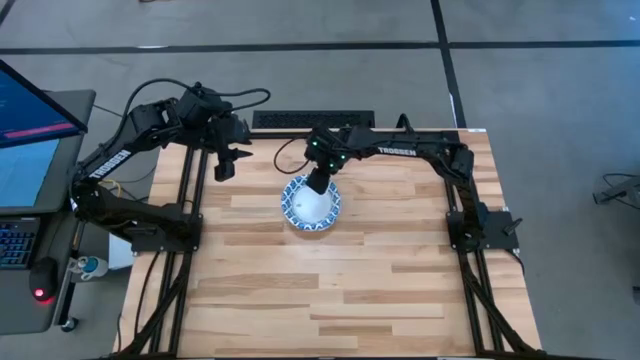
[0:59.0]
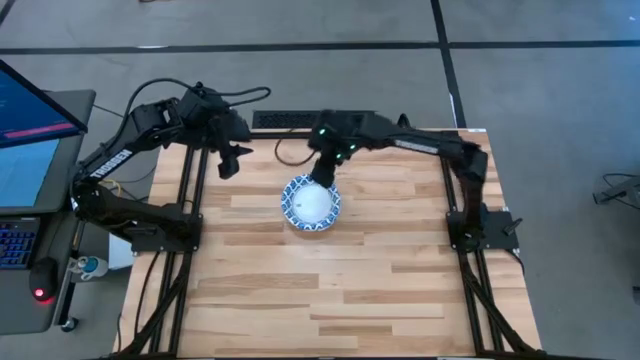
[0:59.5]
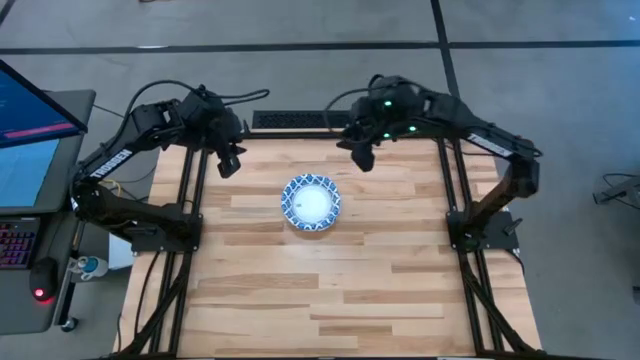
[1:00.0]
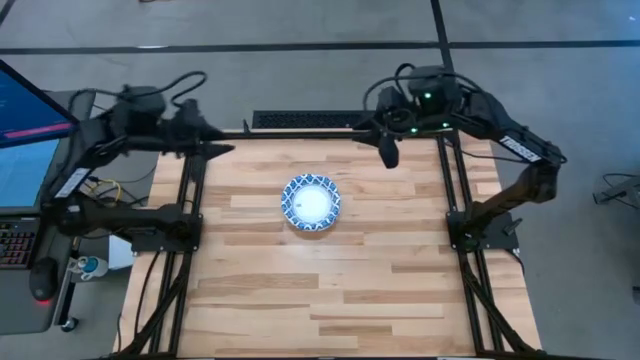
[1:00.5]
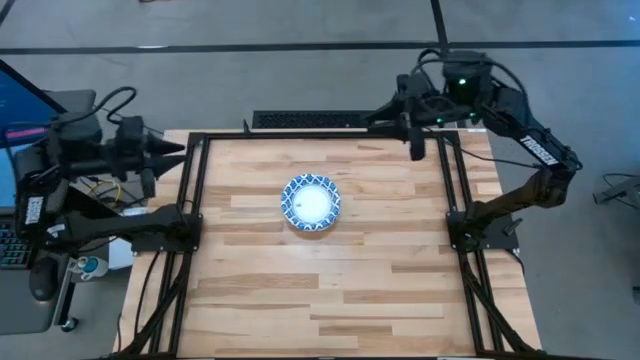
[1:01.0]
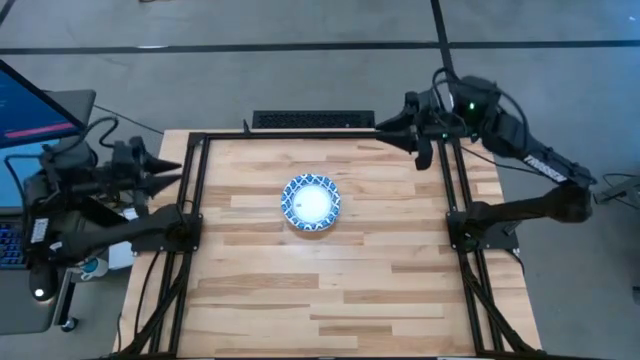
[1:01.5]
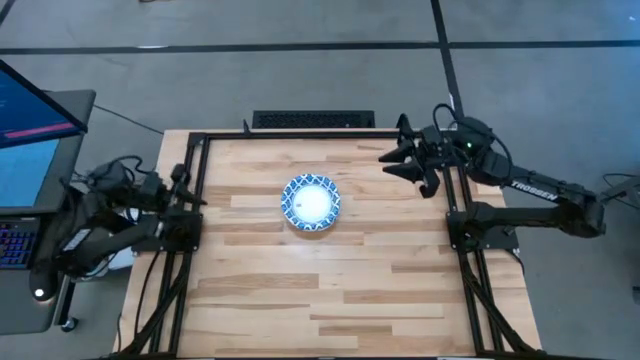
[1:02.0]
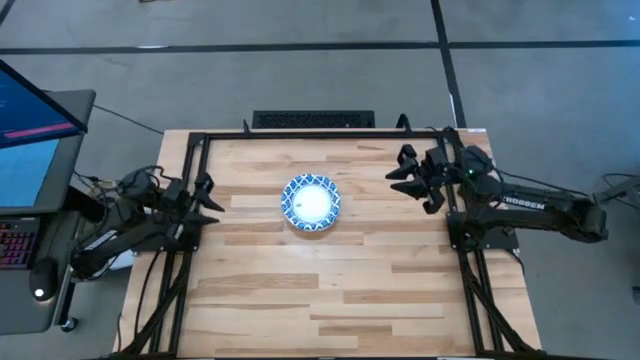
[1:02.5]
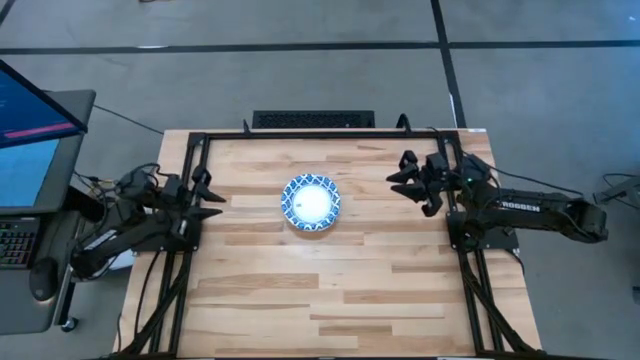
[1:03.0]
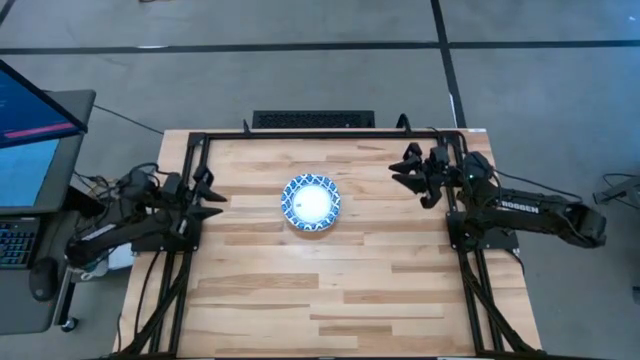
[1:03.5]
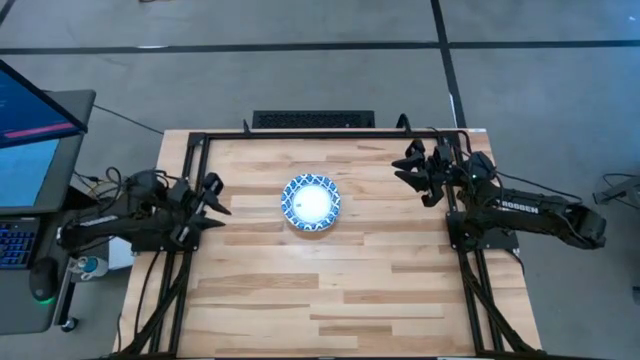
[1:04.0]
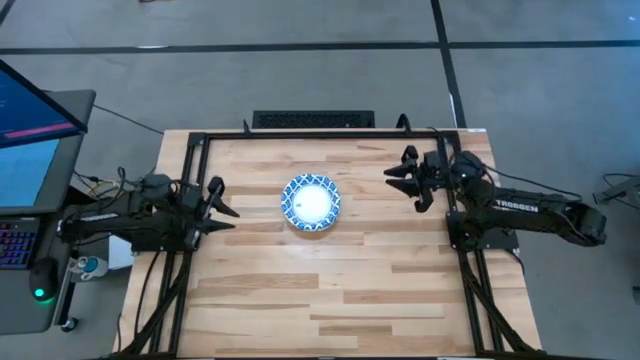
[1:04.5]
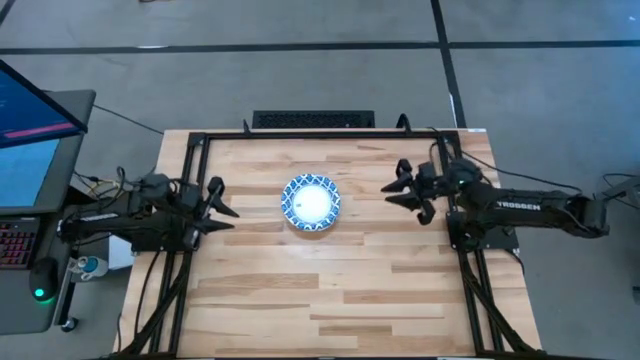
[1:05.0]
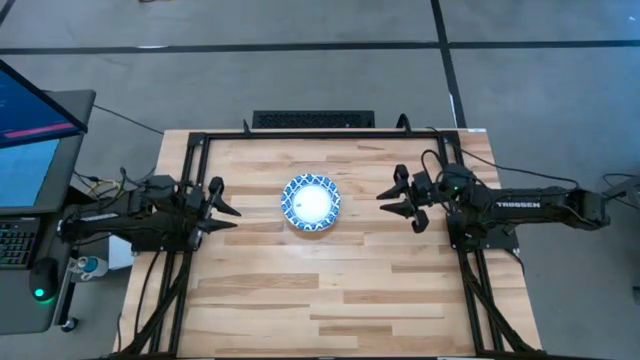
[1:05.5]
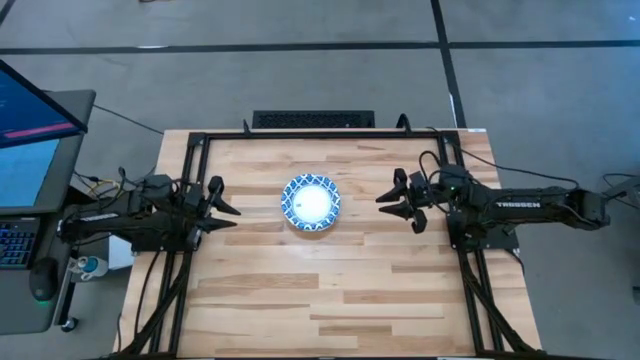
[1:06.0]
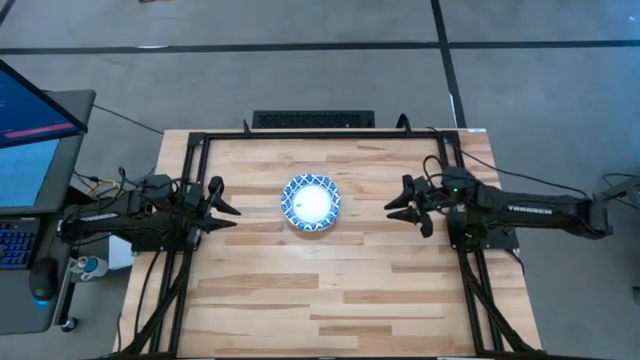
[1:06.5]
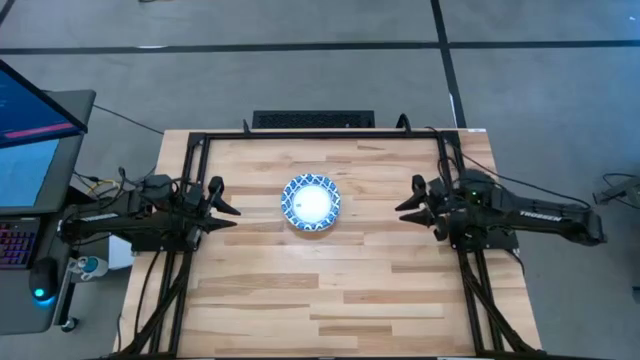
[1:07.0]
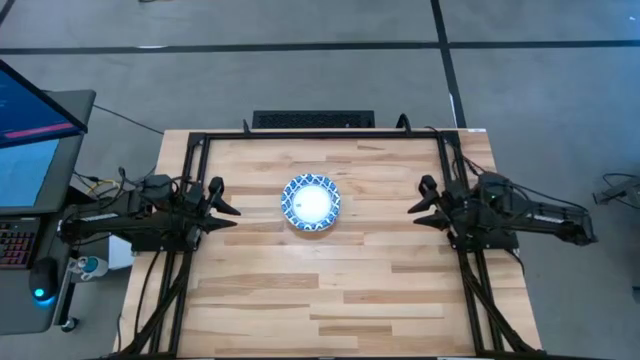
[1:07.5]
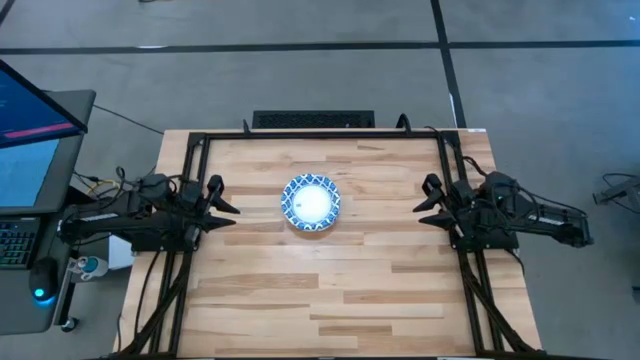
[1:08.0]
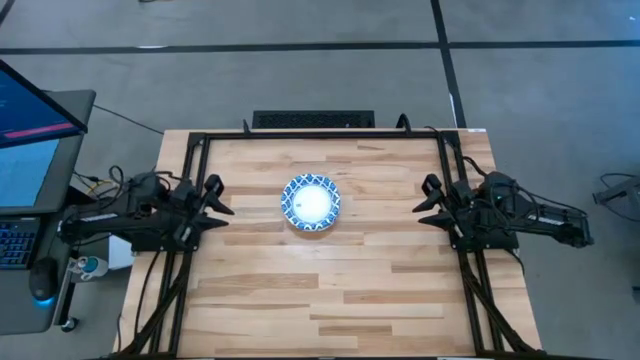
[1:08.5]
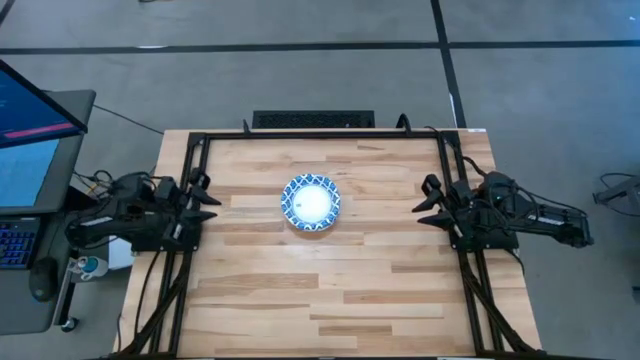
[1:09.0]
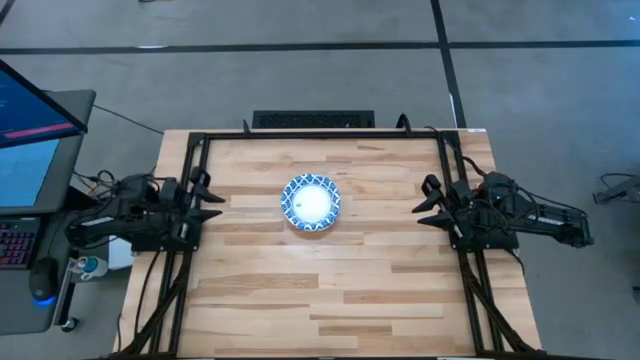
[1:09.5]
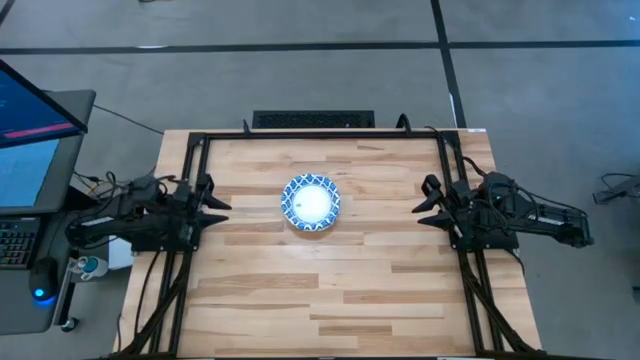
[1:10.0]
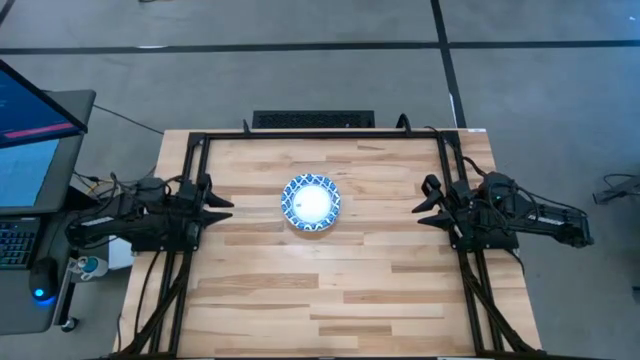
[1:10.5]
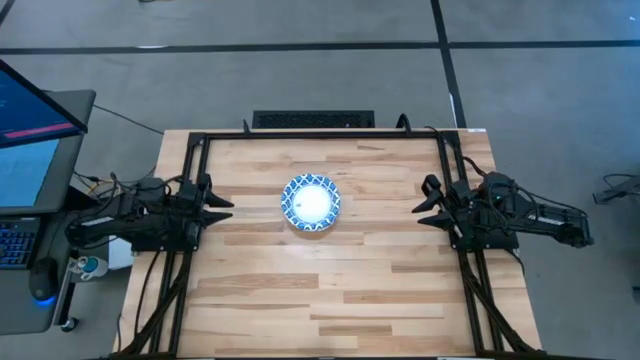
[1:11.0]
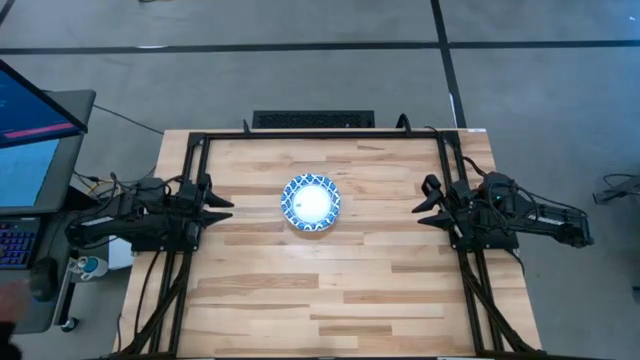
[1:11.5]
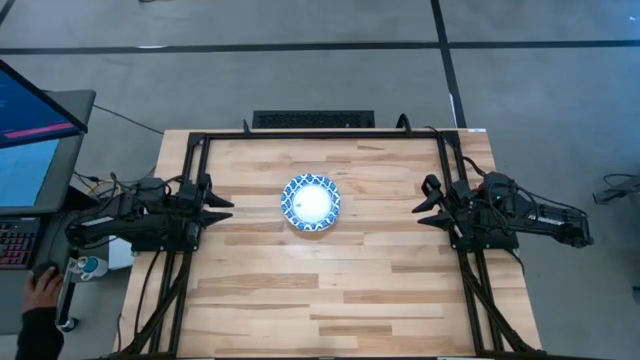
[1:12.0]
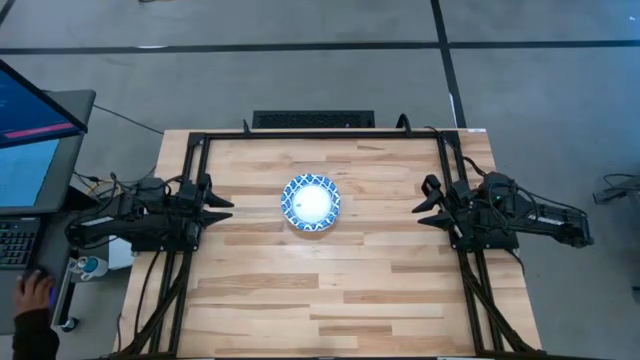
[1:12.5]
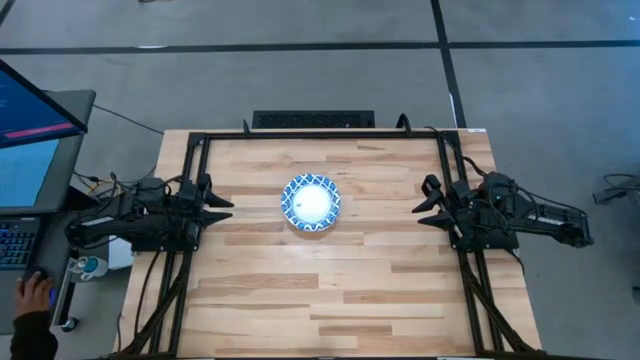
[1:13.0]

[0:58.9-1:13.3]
Task: Nest bowls inside each other
Return to Home Position

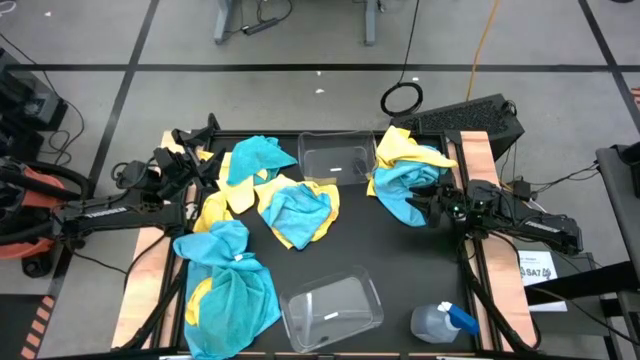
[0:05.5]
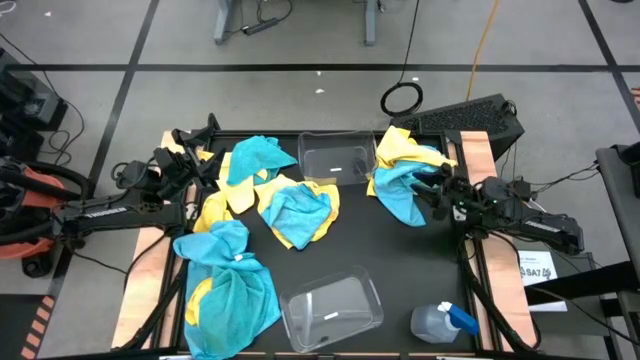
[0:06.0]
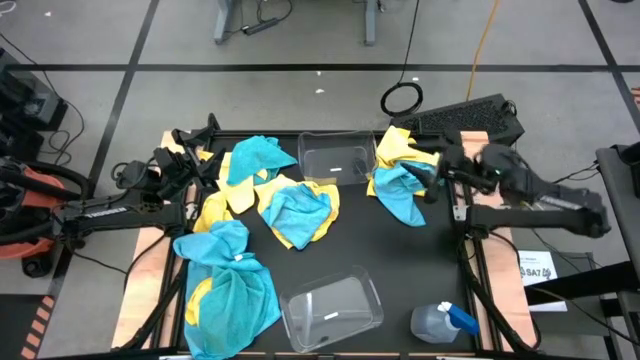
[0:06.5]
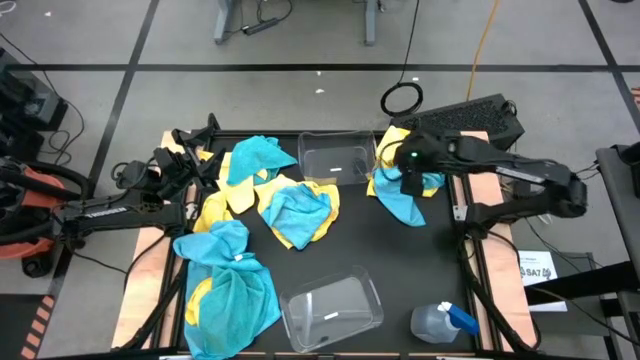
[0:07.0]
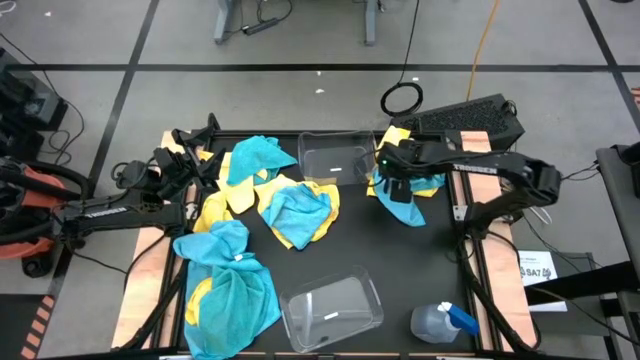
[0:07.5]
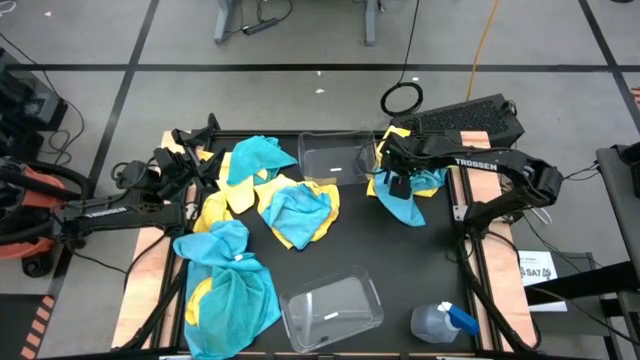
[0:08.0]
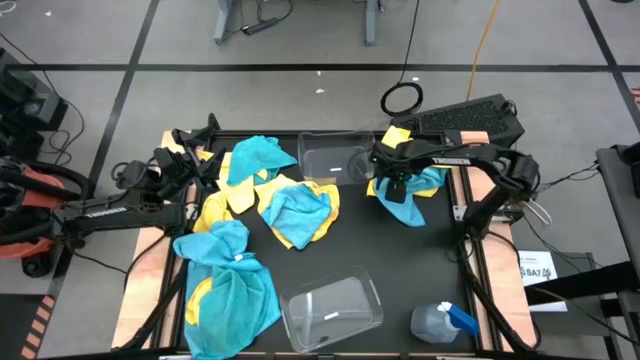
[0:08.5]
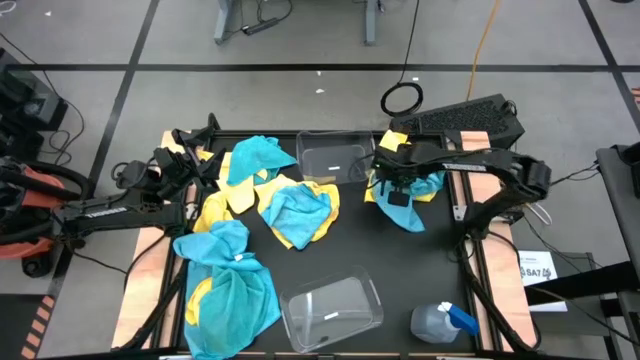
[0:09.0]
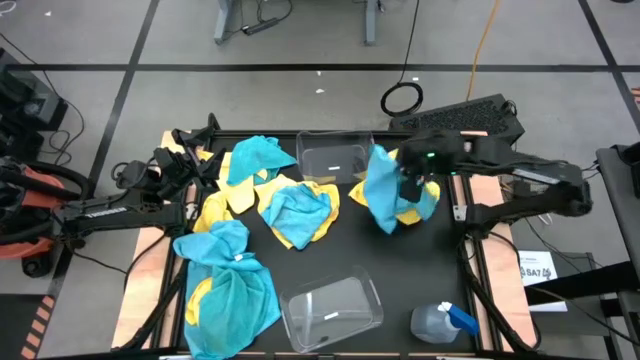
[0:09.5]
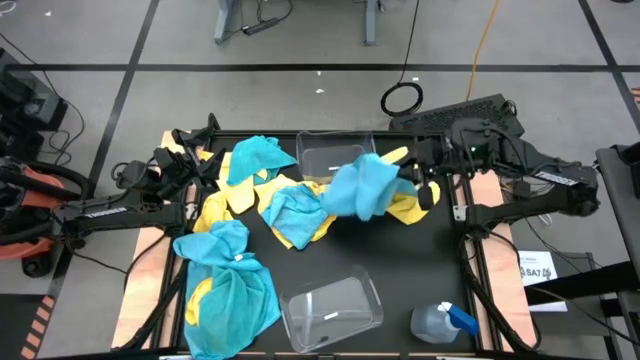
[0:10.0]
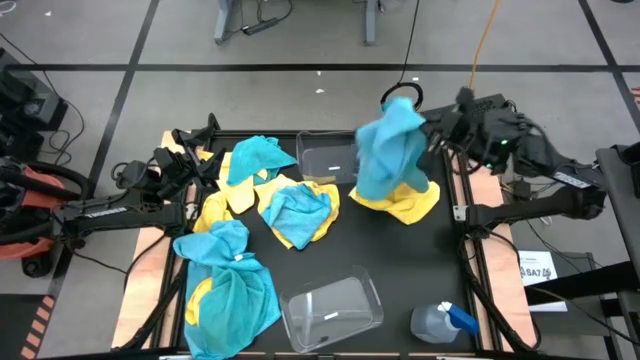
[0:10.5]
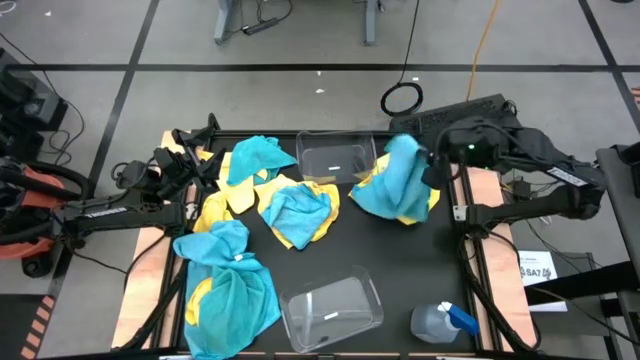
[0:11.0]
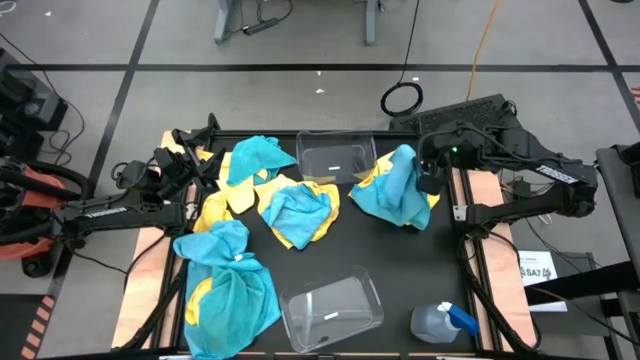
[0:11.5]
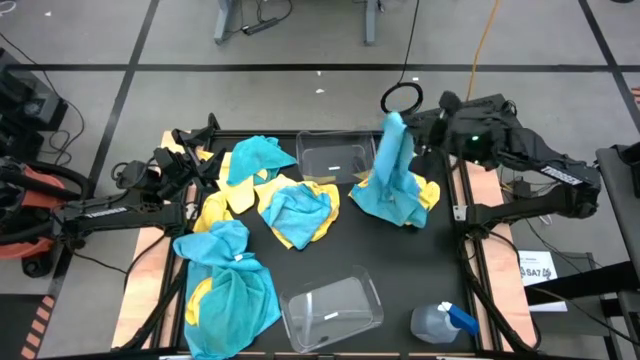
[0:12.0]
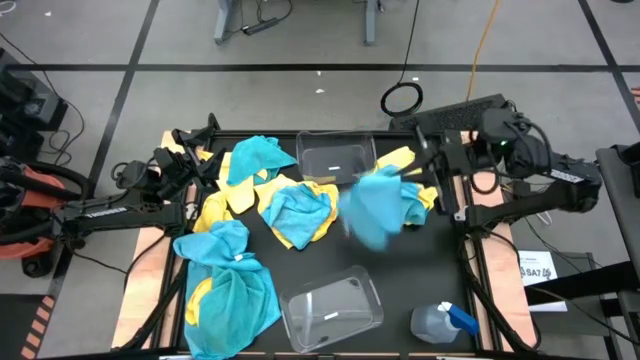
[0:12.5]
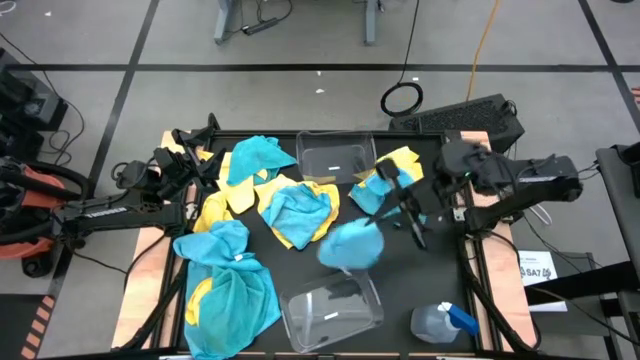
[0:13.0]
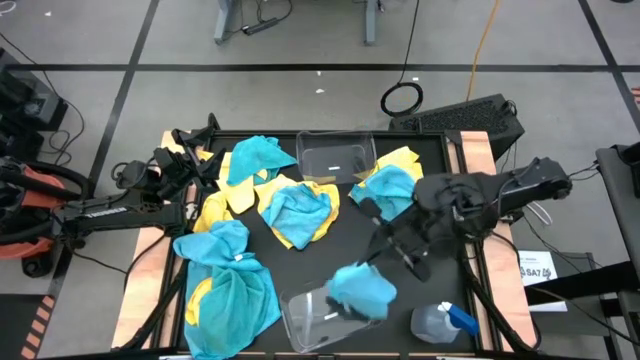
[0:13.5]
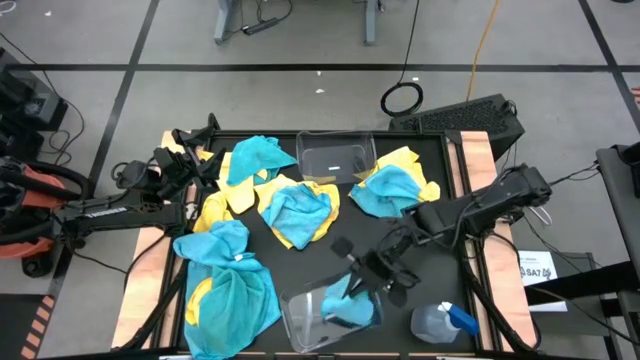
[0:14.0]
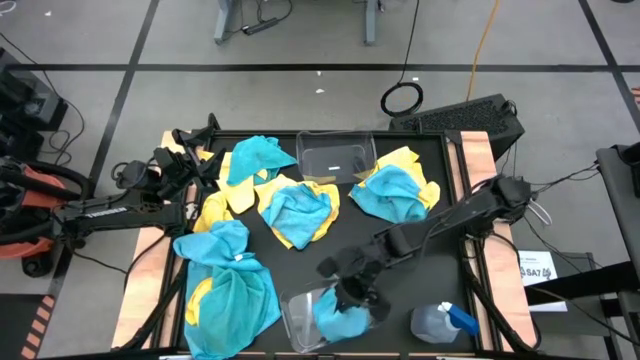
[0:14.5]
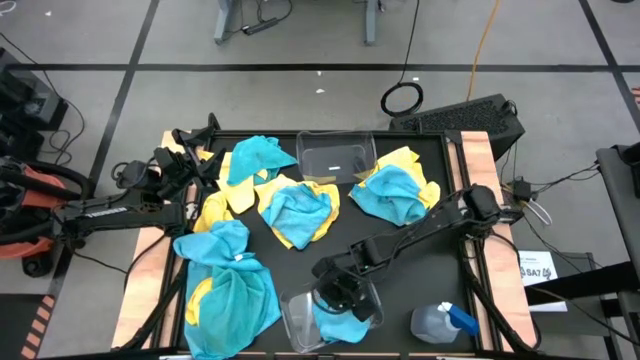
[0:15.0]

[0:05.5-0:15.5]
Task: Sort microfiber towel by color & place in baskets
Put the blue towel into the bottom transparent bin
